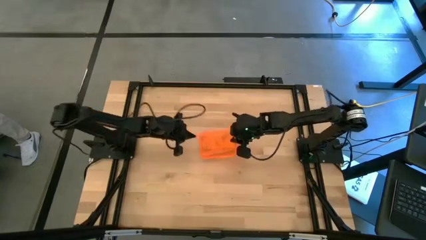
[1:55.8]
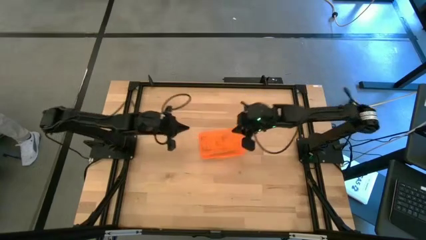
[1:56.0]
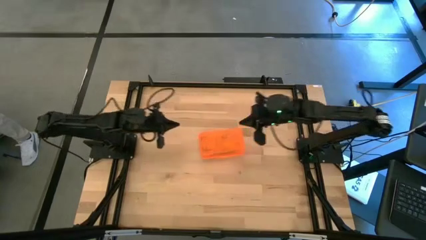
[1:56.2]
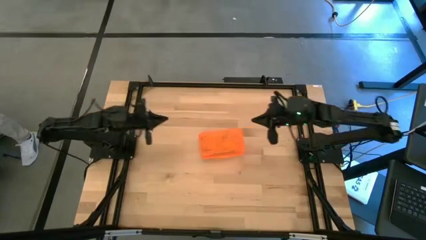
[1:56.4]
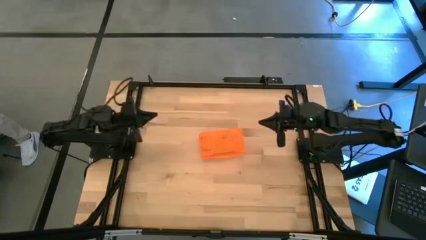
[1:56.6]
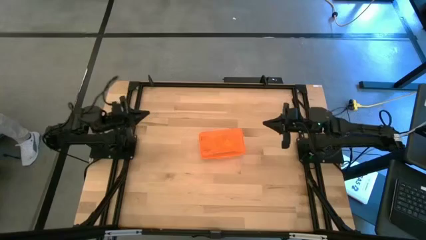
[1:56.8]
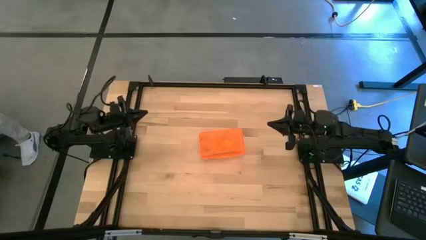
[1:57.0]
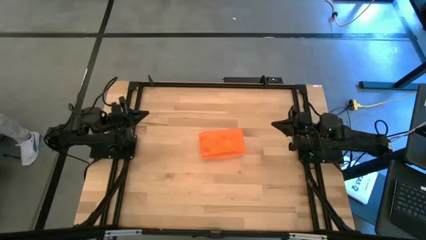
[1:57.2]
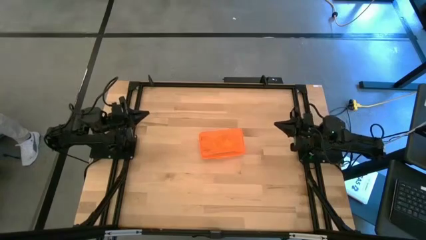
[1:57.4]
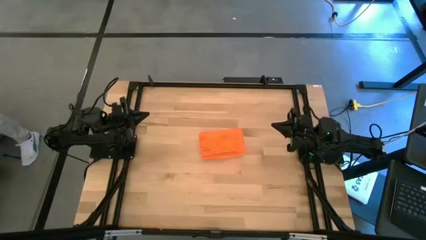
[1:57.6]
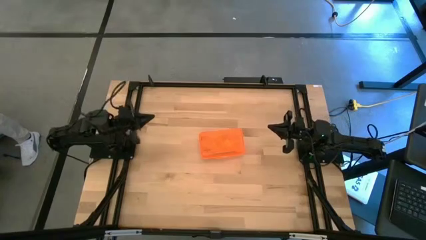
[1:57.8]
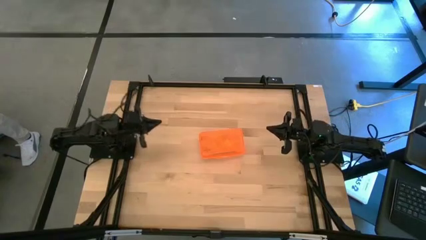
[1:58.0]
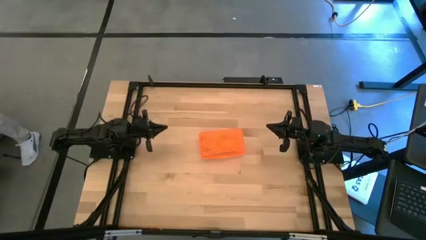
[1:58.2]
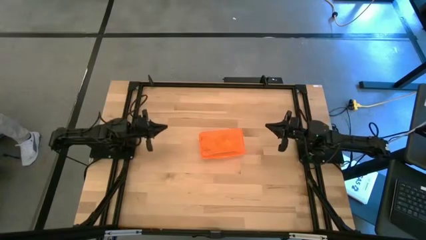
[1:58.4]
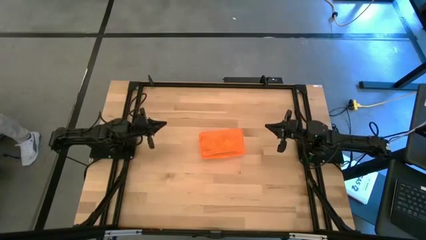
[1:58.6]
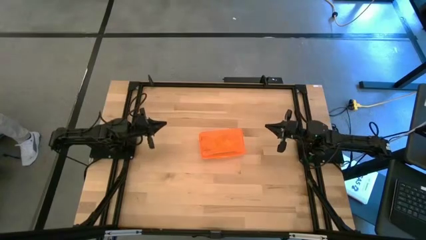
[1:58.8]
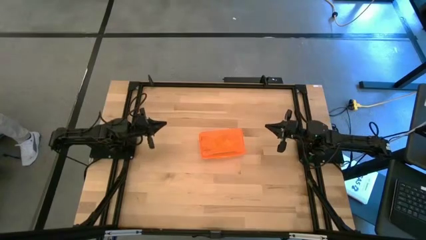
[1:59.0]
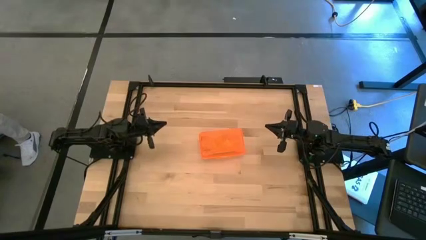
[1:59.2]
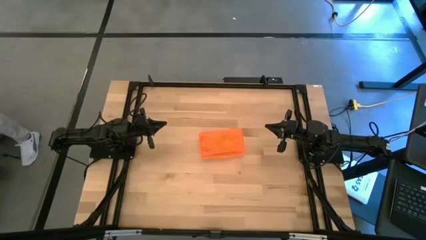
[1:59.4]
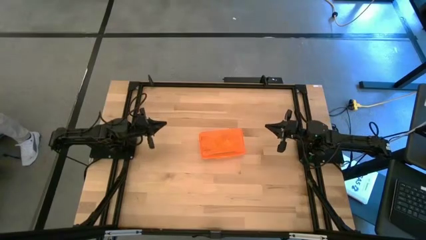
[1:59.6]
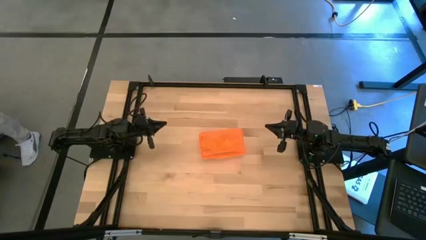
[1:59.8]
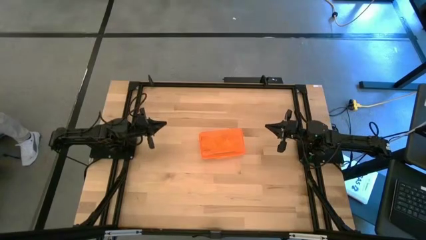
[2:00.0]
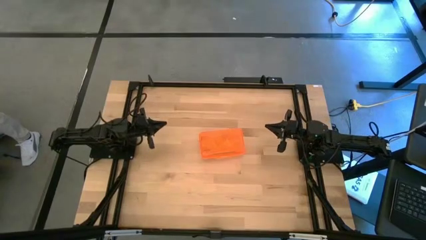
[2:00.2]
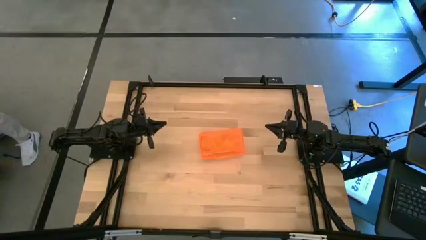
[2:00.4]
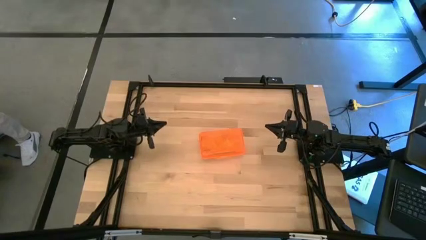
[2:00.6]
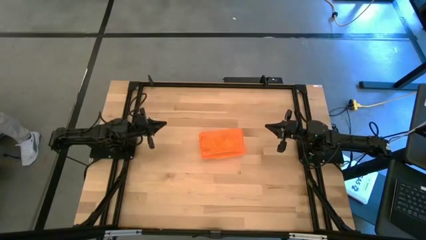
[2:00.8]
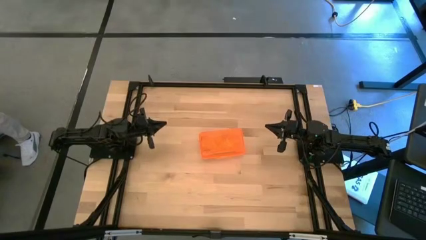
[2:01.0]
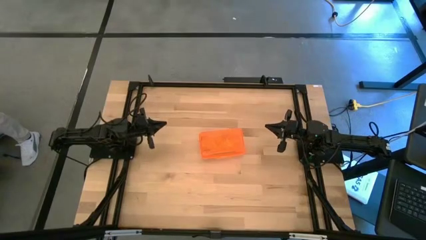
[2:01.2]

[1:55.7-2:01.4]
Task: Pack school essentials
Return to Home Position

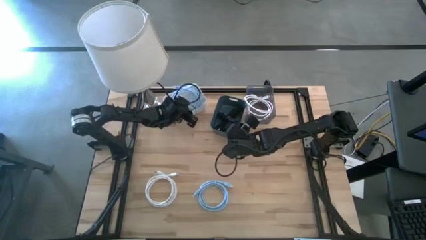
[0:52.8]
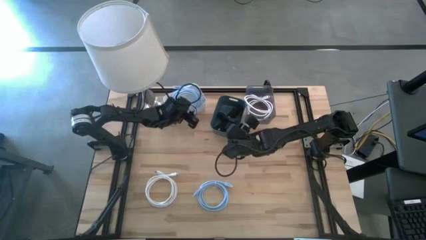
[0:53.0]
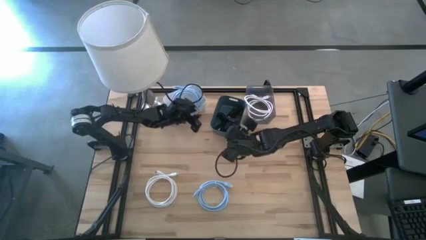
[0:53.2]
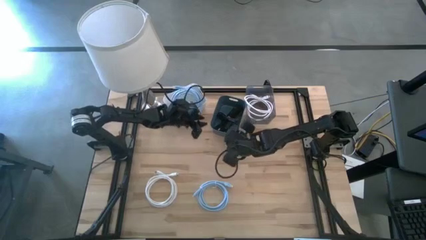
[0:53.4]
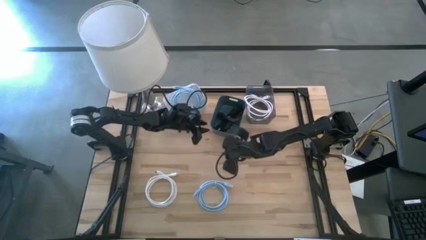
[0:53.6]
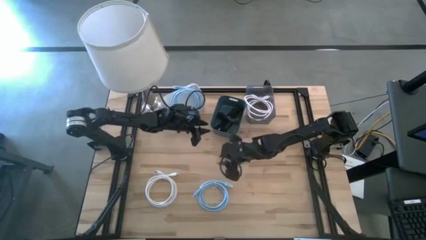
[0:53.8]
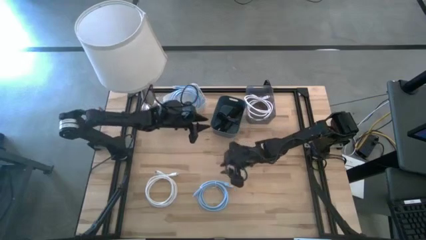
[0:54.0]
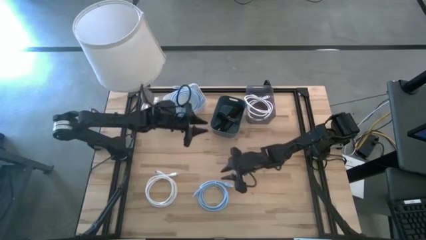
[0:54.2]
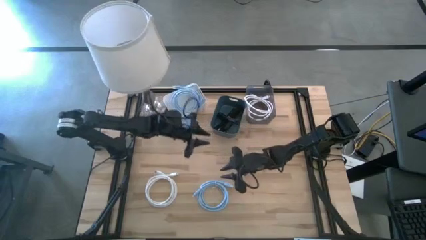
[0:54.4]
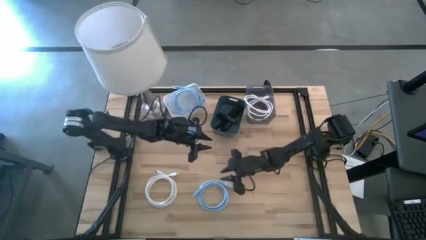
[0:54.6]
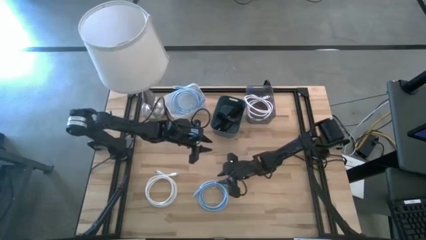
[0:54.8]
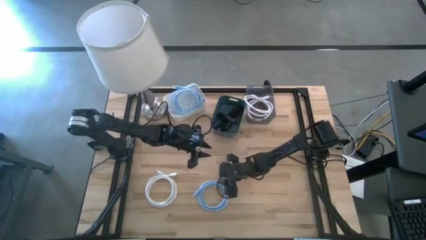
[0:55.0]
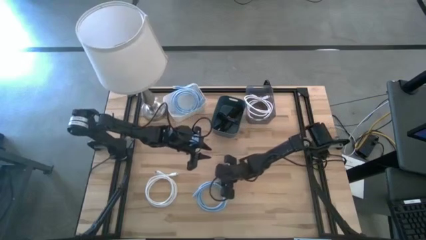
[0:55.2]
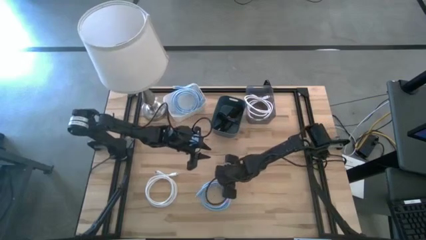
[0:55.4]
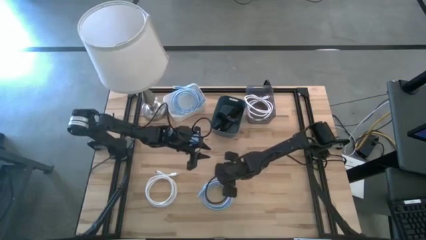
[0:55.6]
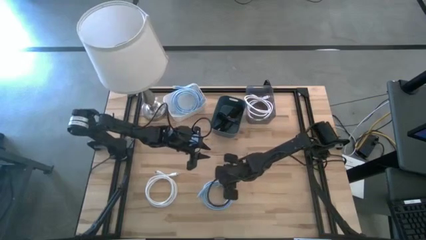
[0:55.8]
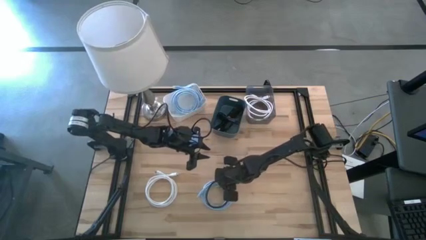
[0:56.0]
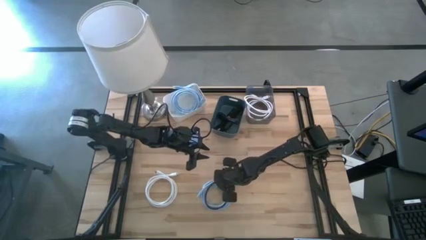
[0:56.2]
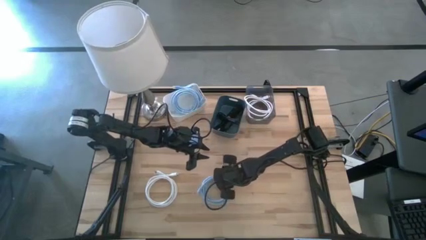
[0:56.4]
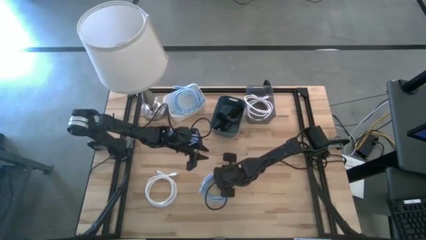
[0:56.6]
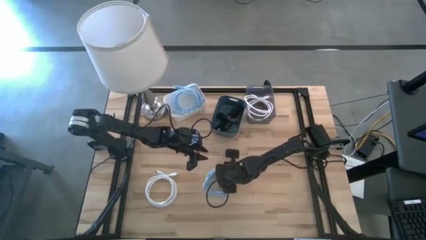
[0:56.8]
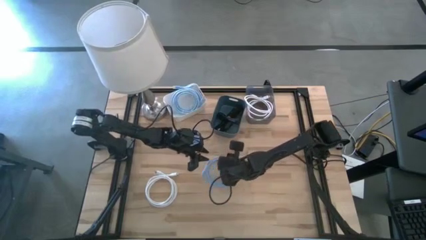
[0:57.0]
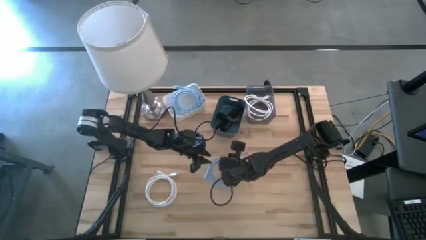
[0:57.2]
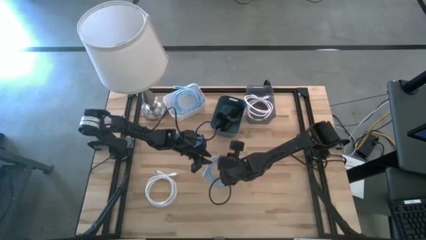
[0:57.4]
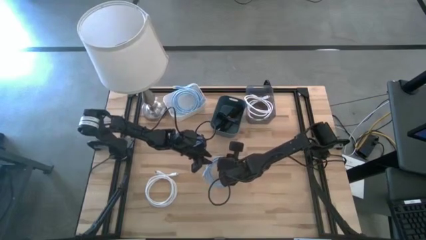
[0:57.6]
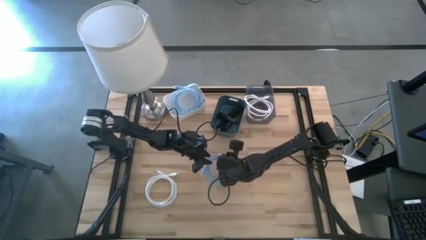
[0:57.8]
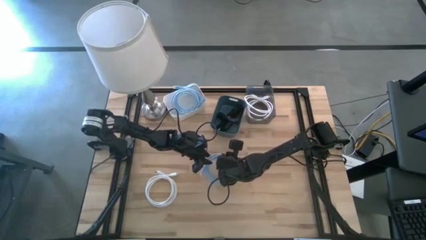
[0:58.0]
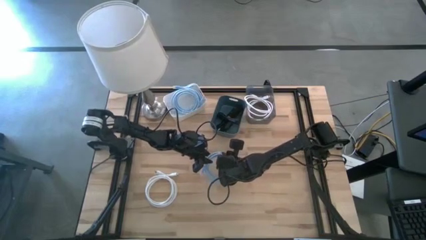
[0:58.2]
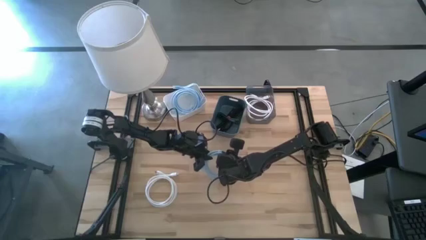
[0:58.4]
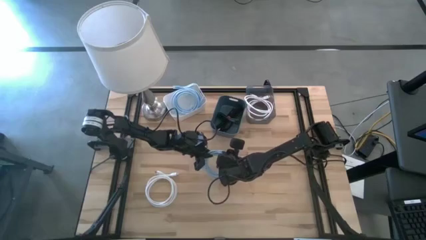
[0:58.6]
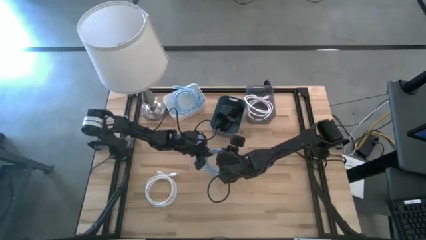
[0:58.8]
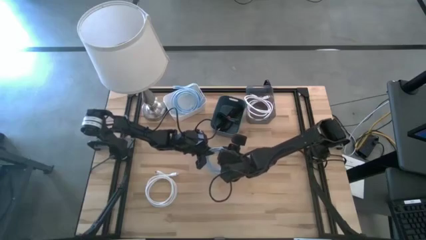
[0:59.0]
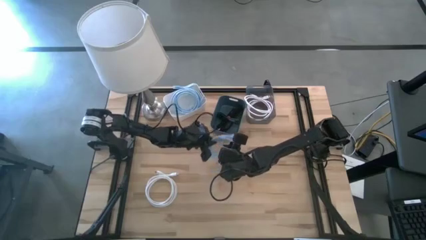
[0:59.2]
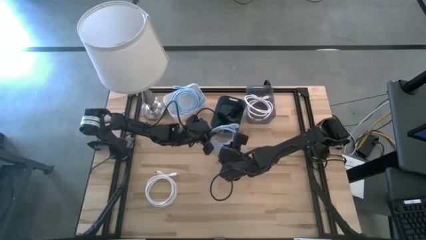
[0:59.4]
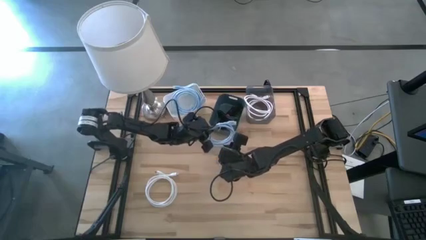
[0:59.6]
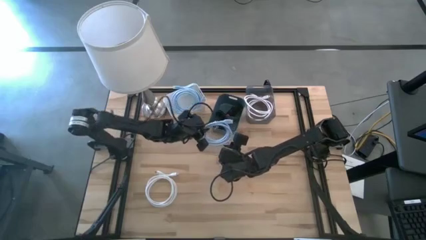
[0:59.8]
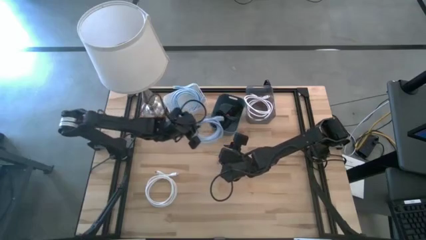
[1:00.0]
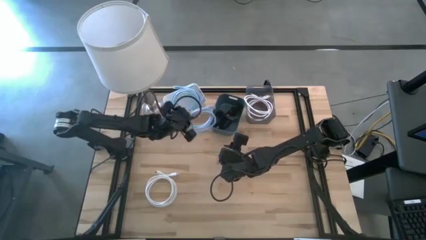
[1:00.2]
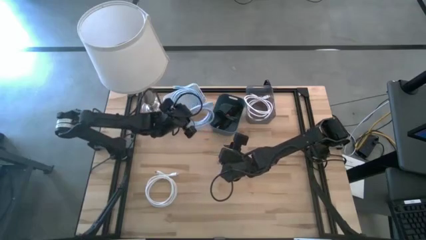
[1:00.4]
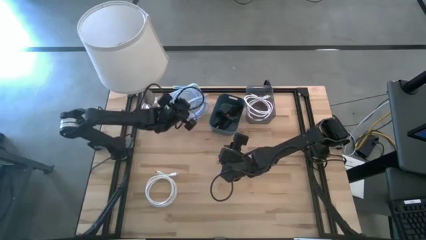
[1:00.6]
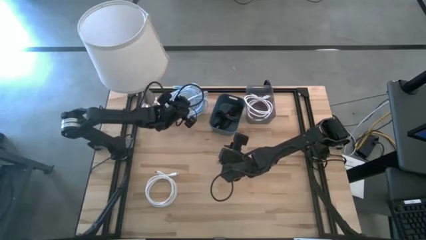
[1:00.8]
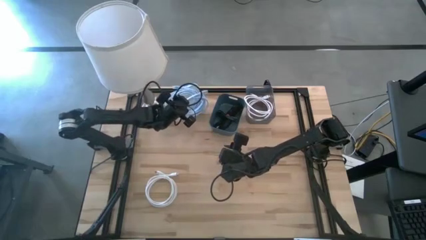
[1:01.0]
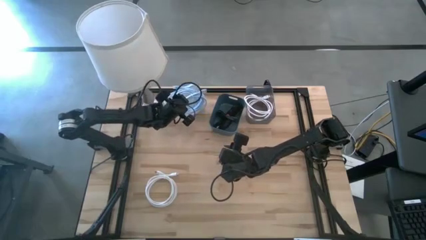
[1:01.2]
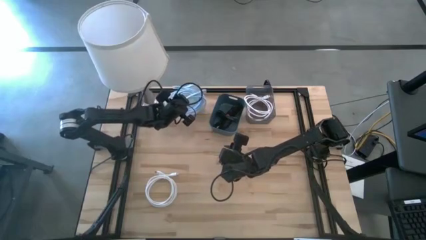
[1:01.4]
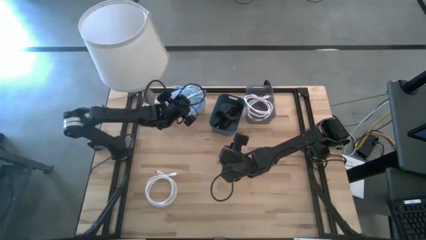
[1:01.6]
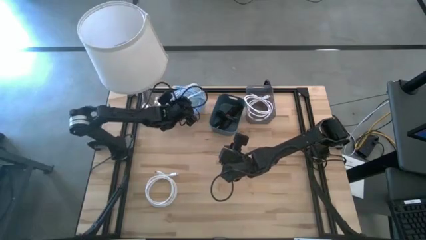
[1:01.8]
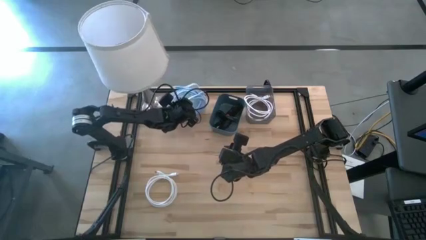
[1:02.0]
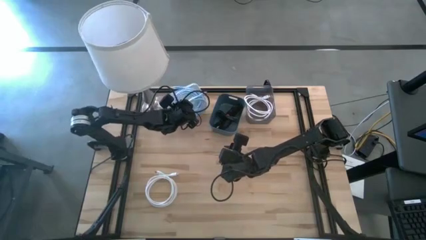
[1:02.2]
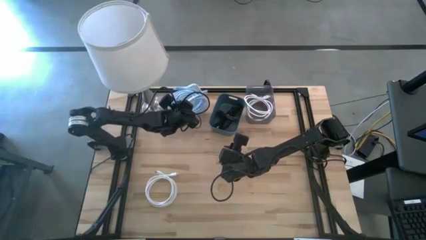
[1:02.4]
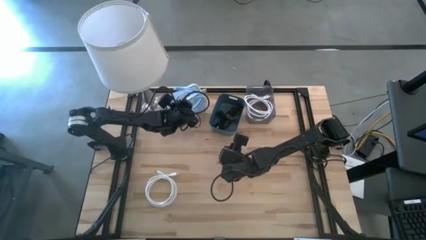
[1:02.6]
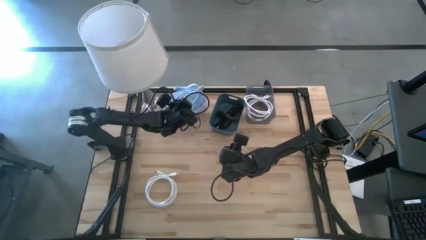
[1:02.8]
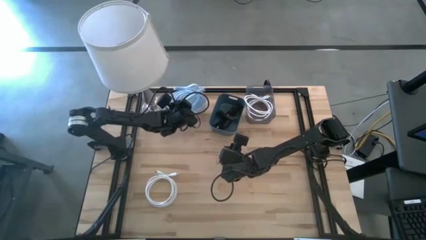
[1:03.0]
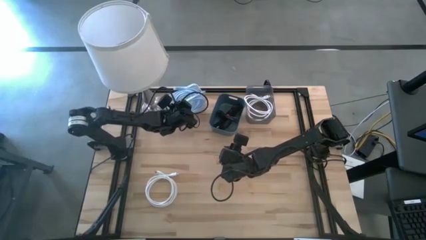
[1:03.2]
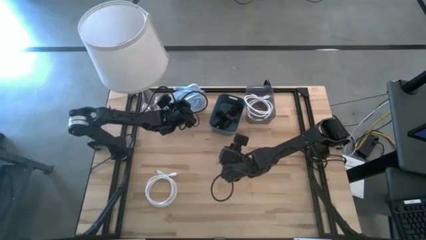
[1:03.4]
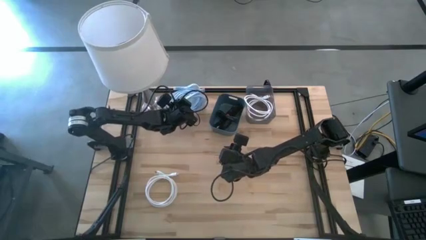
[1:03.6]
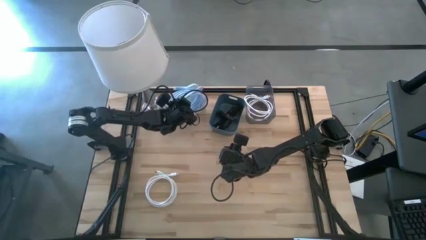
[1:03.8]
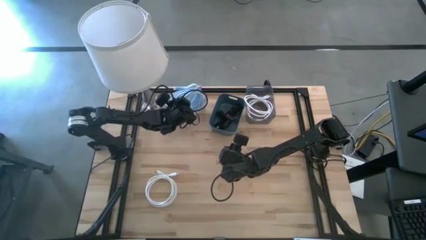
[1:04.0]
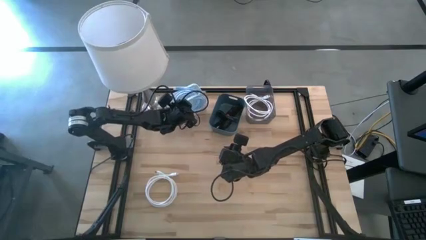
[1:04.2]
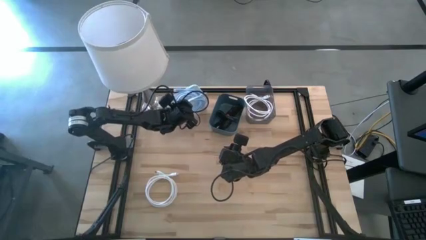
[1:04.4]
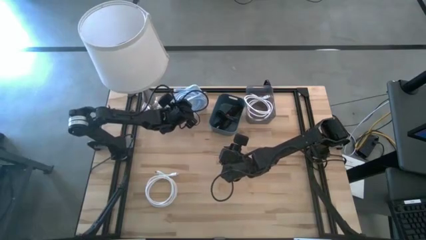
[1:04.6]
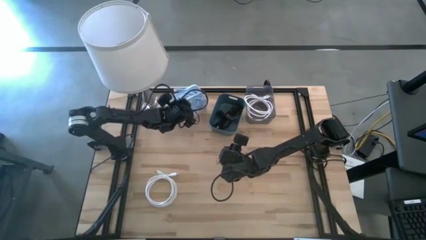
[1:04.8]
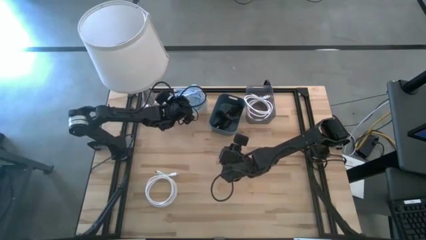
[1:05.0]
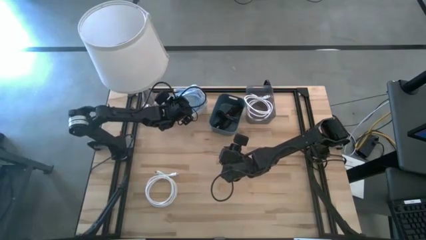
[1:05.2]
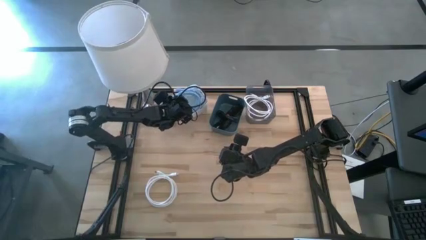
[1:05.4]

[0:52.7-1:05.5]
Task: Pick & Place USB Port
Put the blue cable into the white bin
